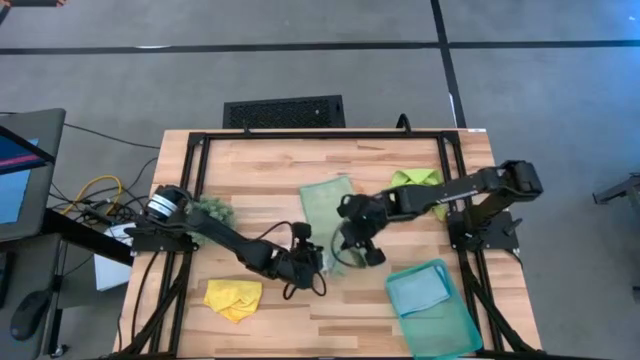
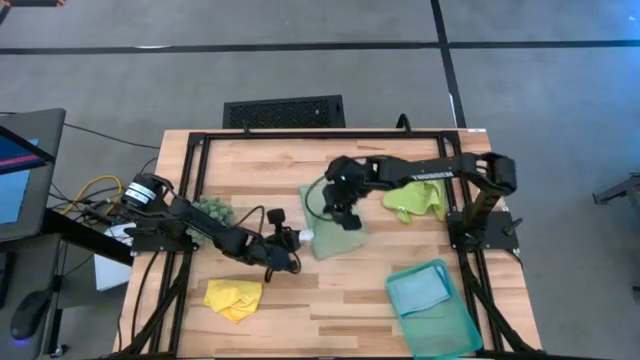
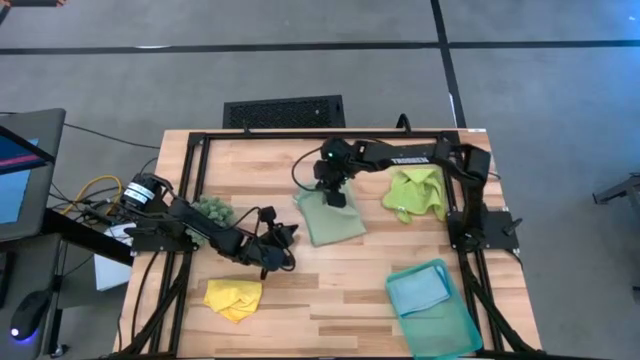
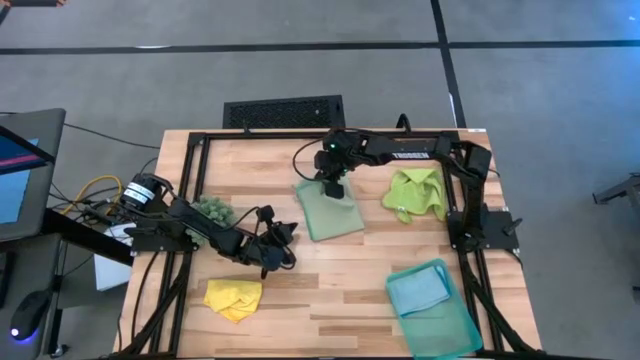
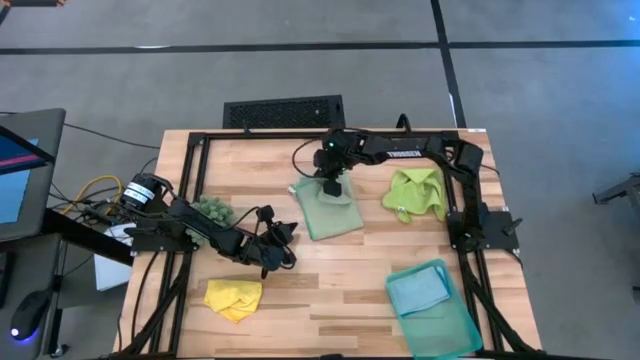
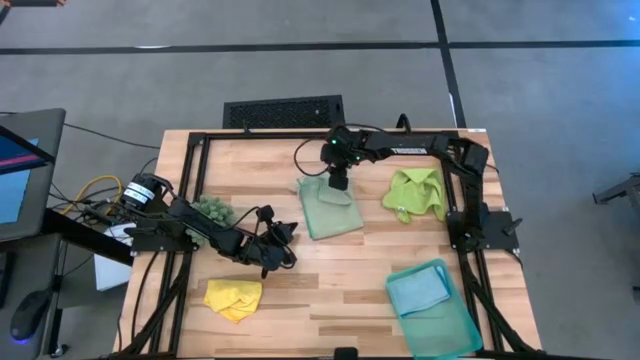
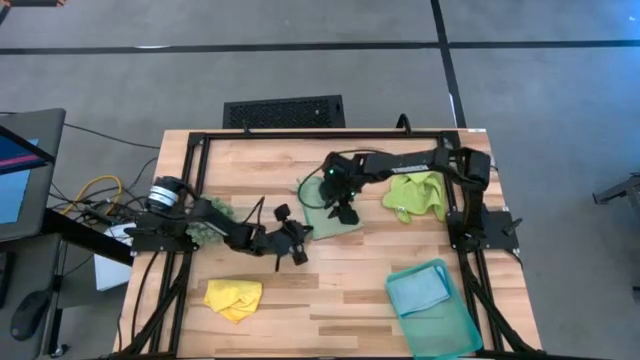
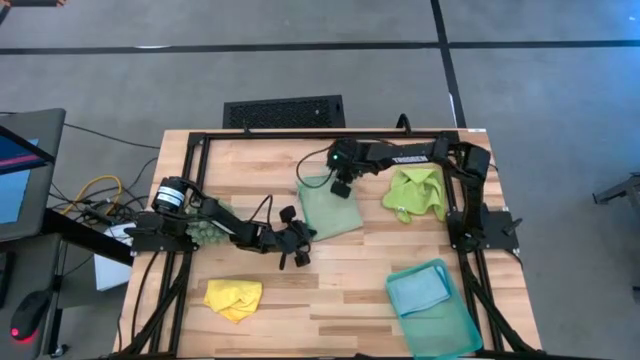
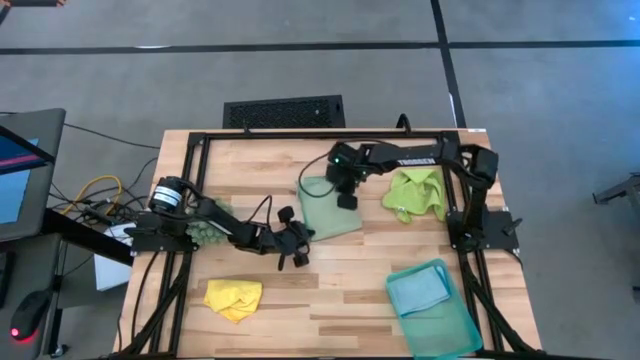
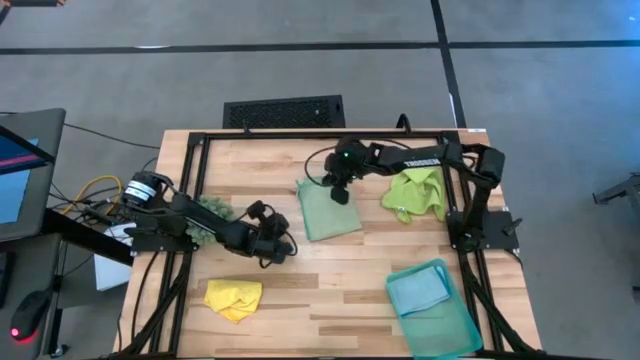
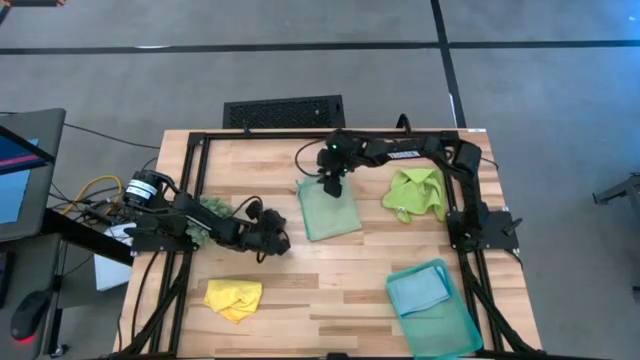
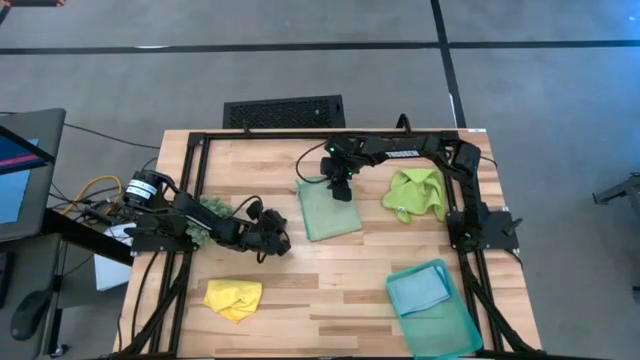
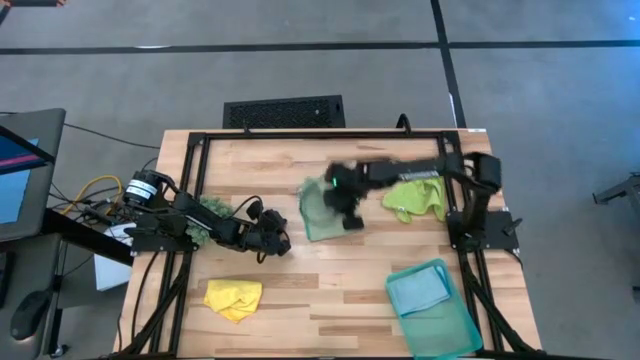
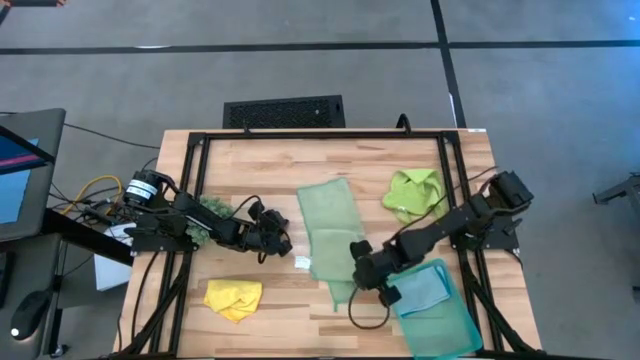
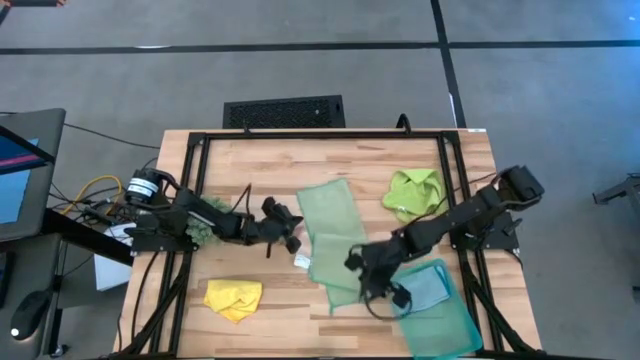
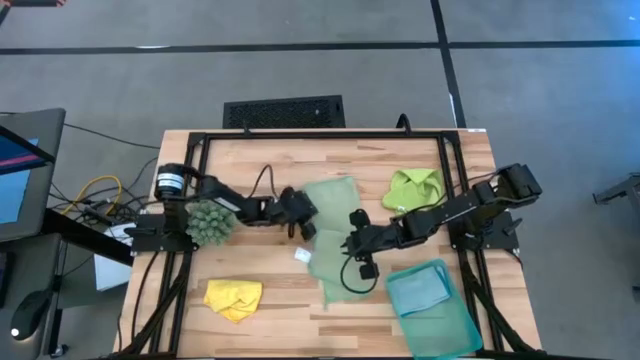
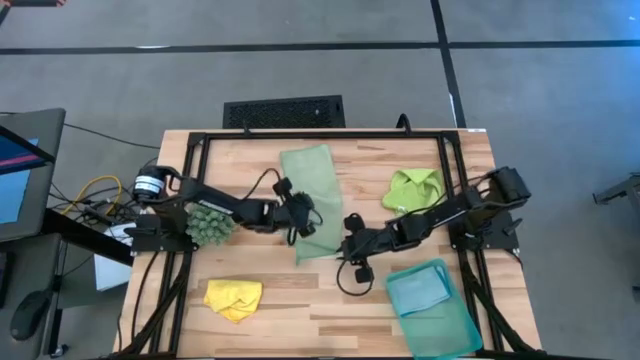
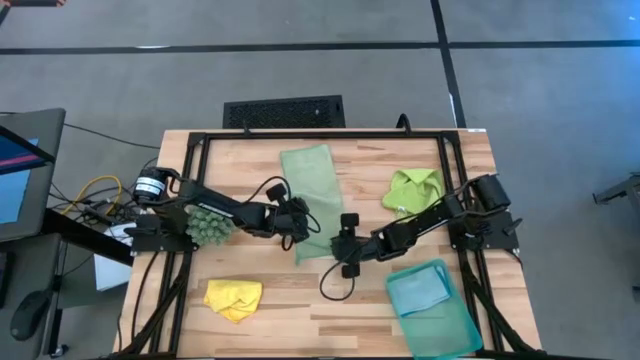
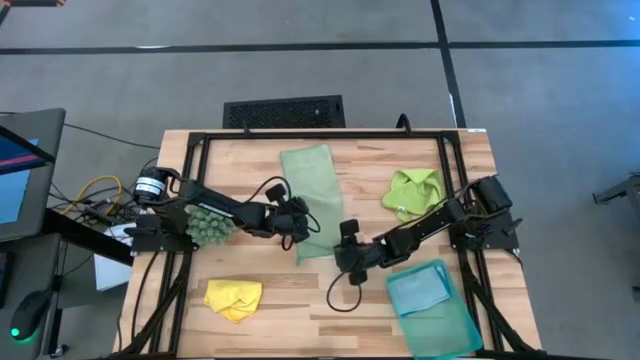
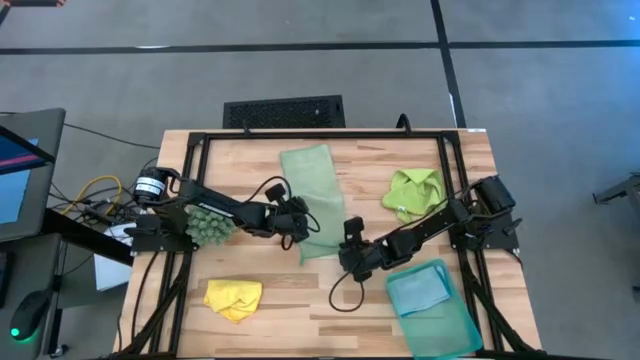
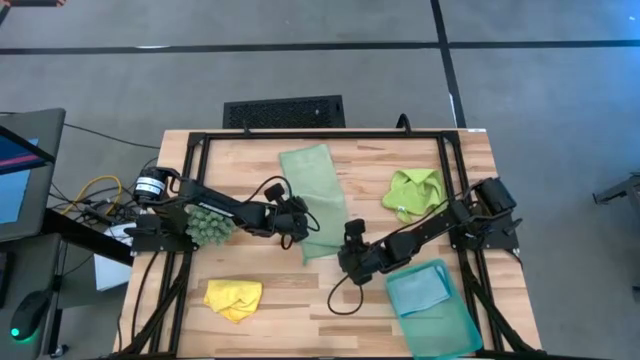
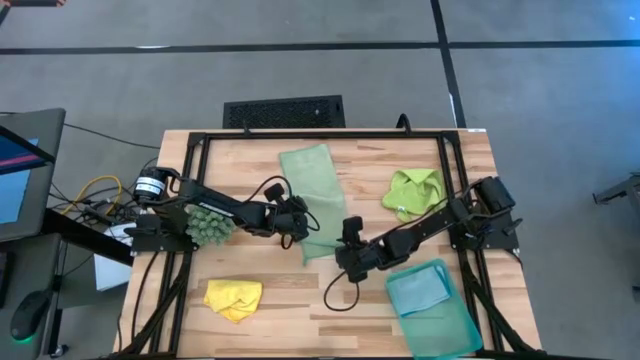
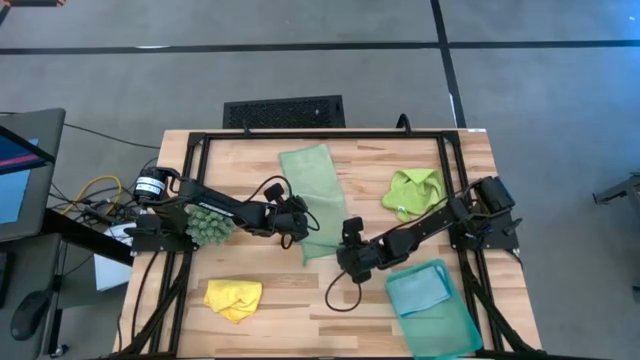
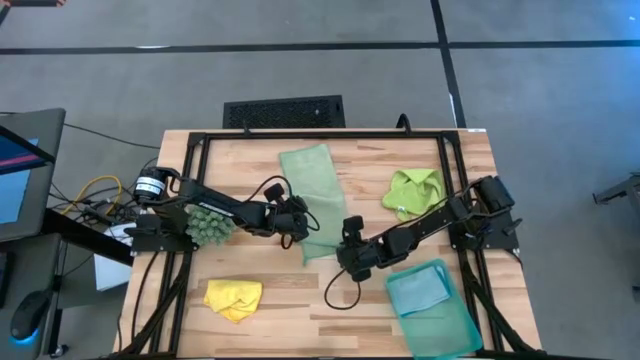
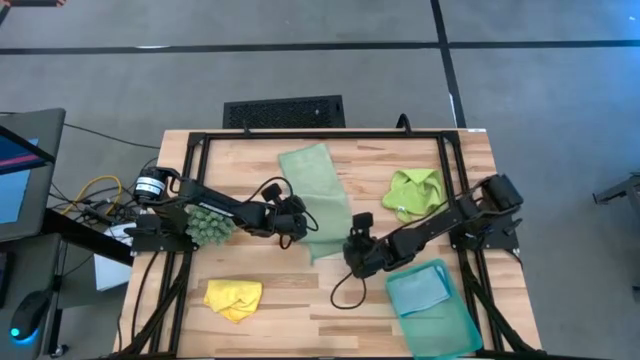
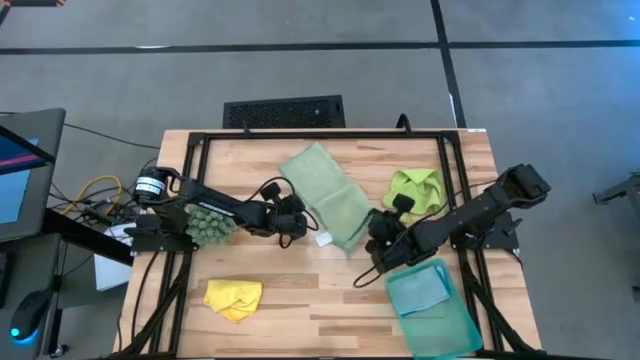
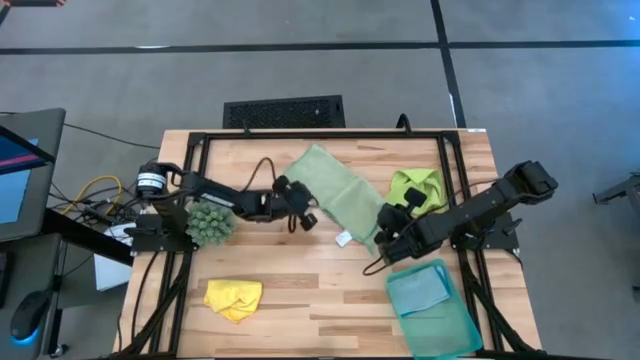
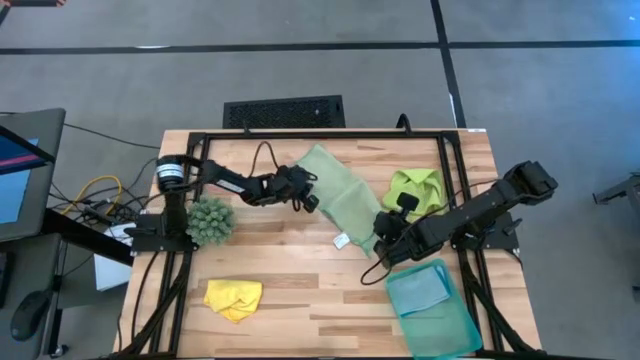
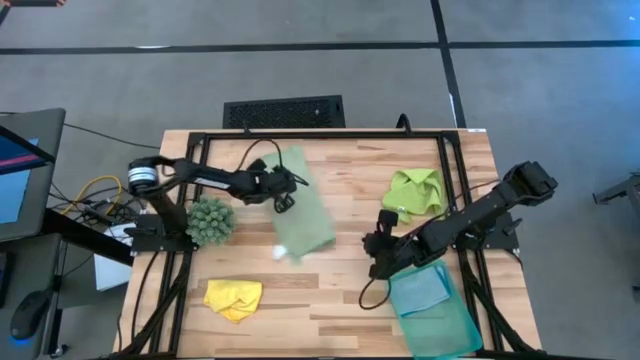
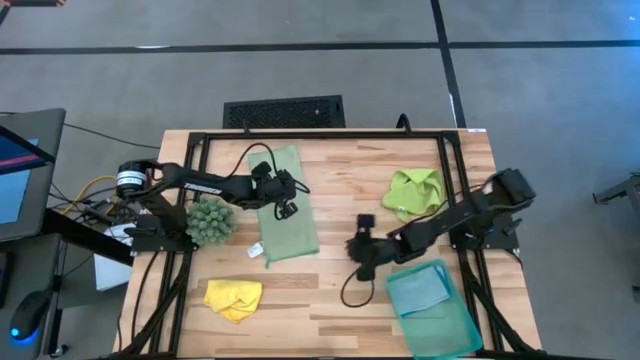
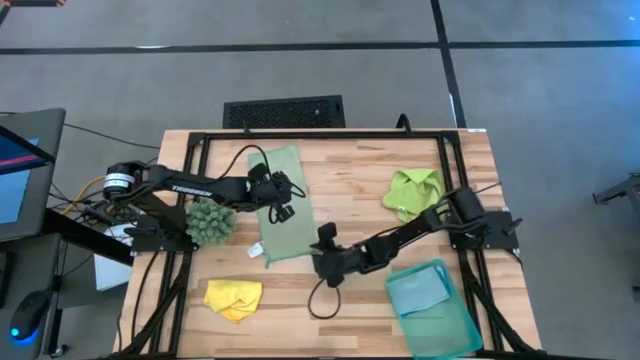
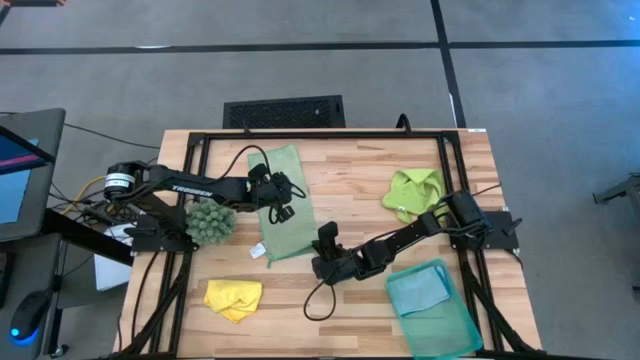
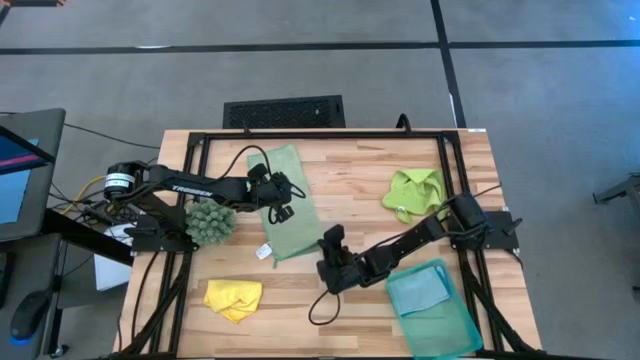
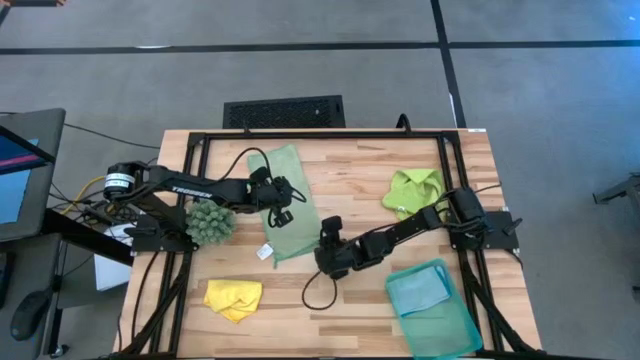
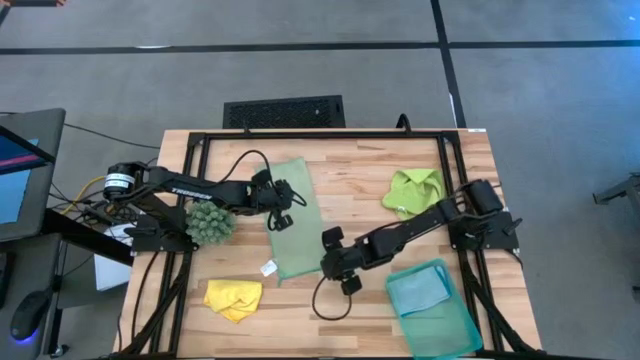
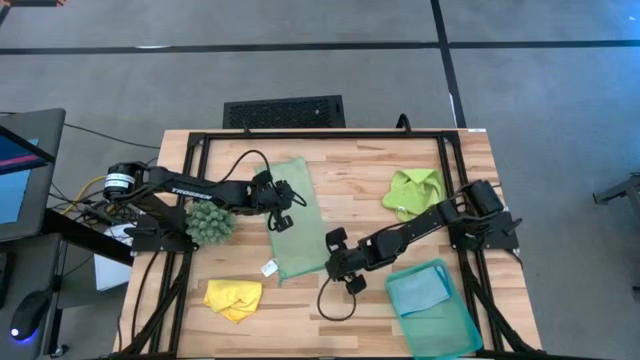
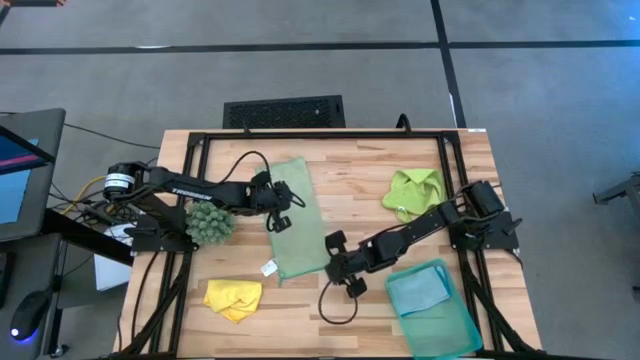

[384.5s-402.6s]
Task: Fold microfiber towels
Fold the green microfiber cloth
